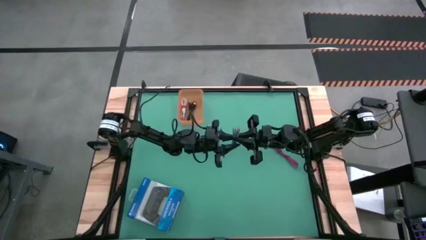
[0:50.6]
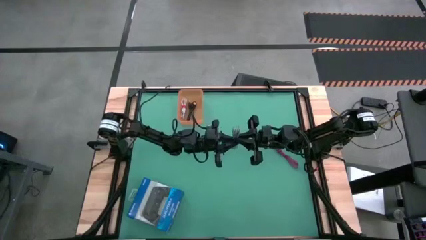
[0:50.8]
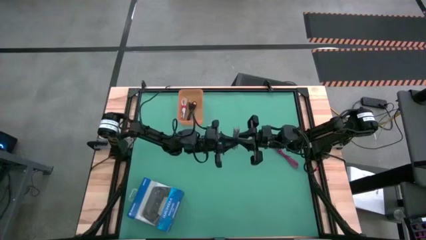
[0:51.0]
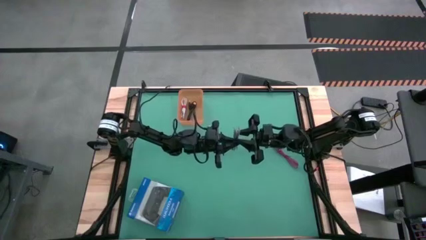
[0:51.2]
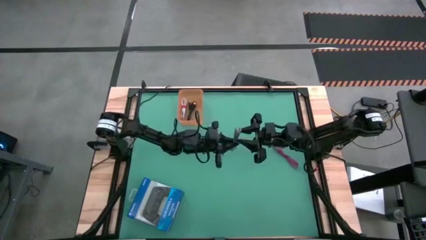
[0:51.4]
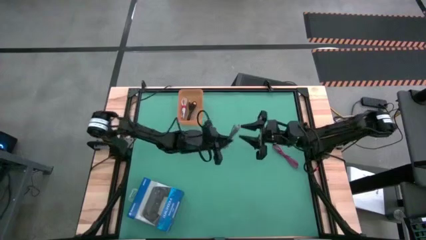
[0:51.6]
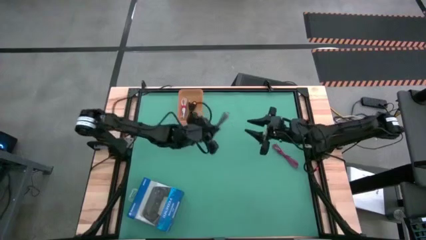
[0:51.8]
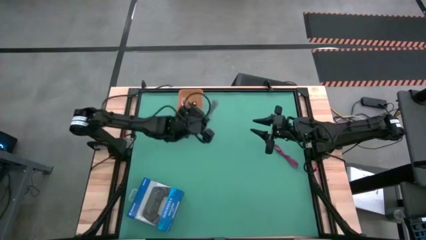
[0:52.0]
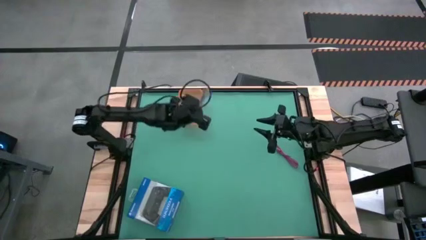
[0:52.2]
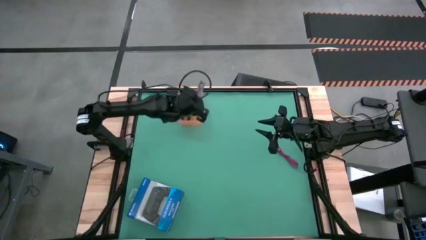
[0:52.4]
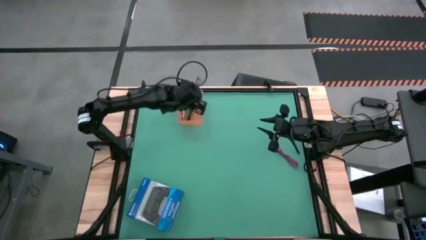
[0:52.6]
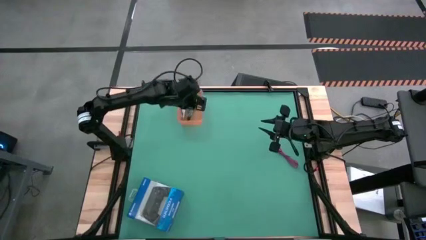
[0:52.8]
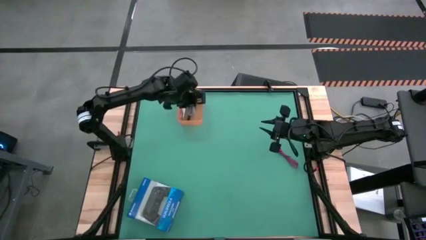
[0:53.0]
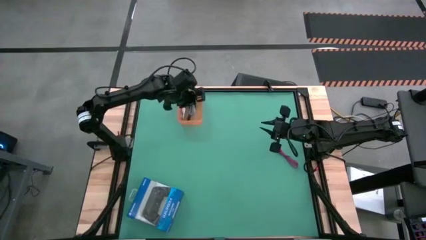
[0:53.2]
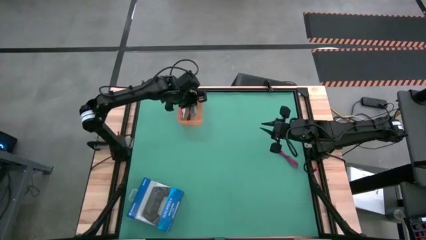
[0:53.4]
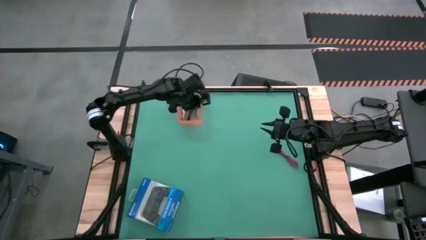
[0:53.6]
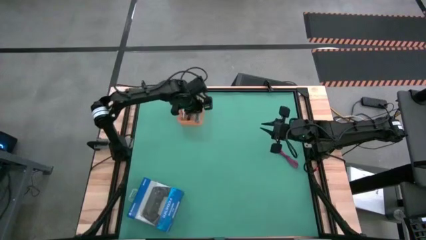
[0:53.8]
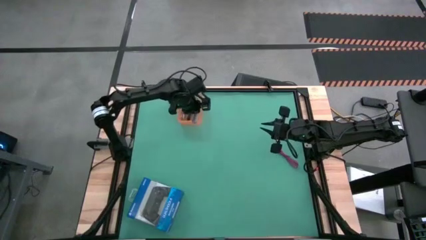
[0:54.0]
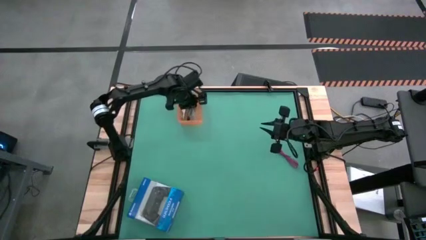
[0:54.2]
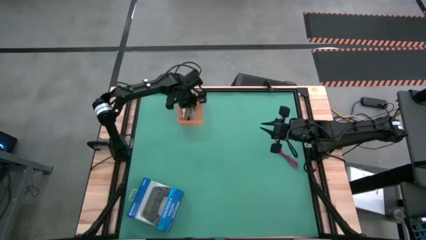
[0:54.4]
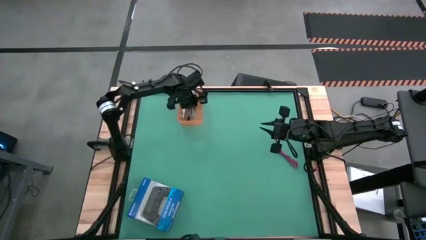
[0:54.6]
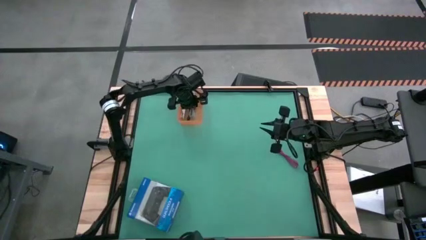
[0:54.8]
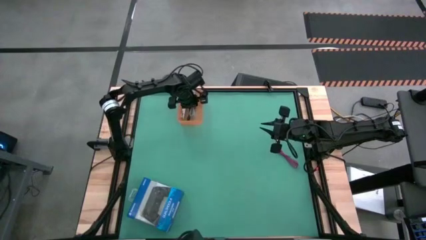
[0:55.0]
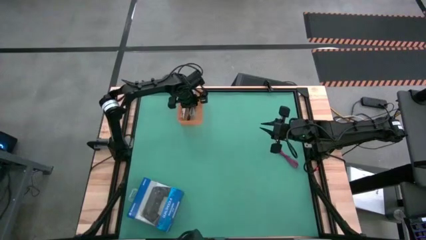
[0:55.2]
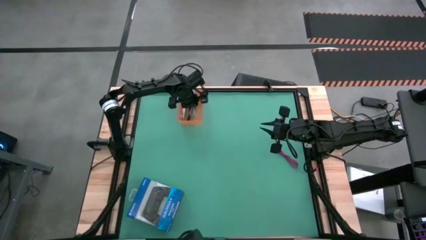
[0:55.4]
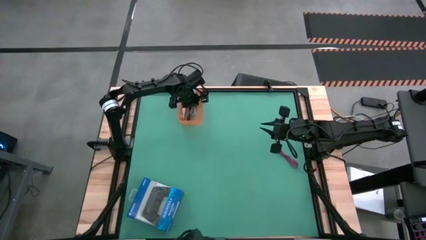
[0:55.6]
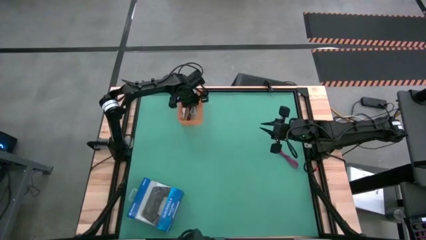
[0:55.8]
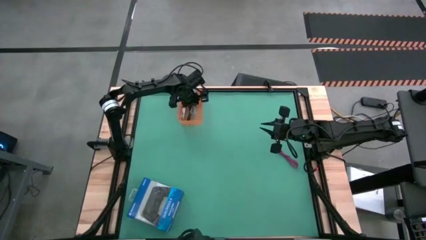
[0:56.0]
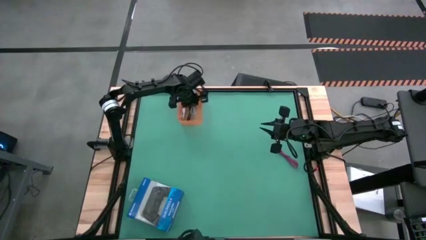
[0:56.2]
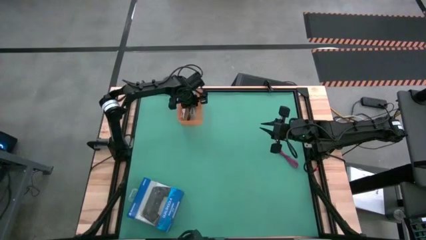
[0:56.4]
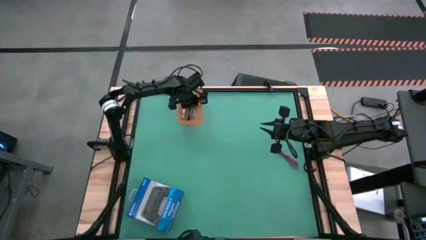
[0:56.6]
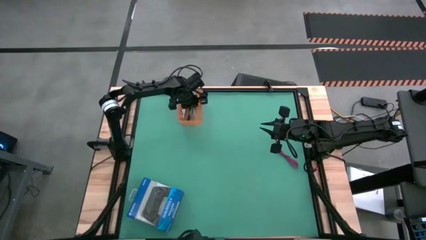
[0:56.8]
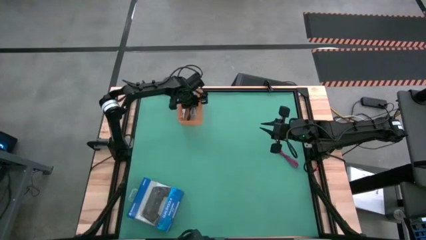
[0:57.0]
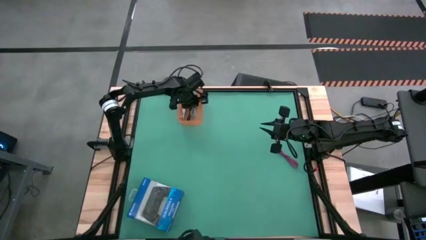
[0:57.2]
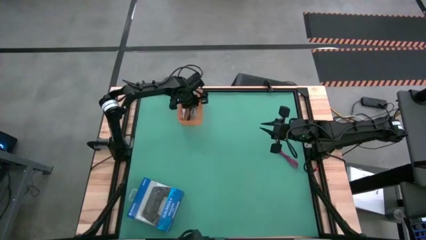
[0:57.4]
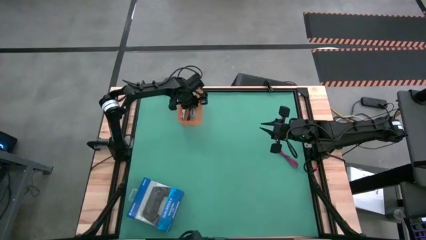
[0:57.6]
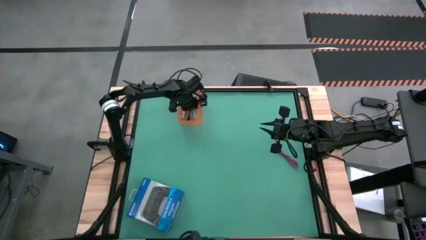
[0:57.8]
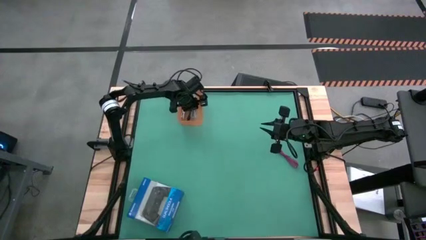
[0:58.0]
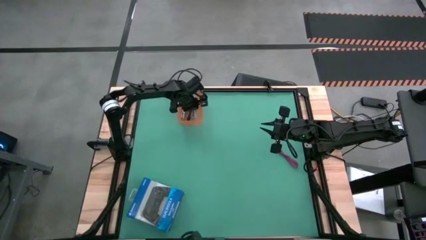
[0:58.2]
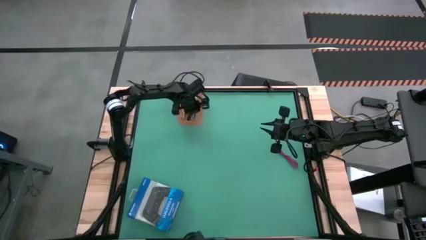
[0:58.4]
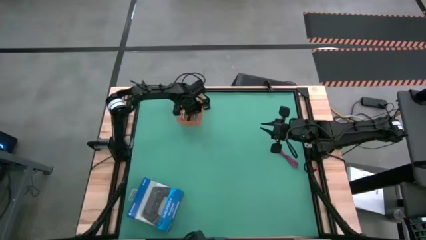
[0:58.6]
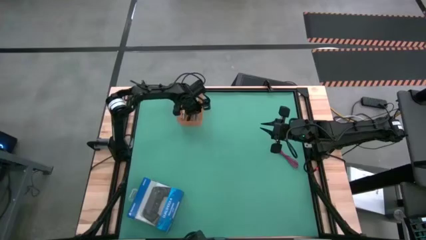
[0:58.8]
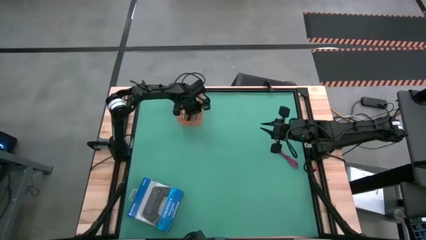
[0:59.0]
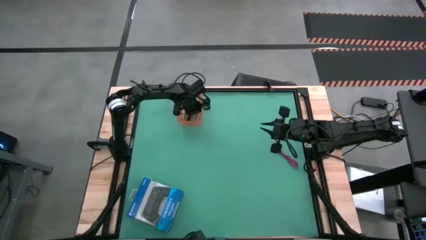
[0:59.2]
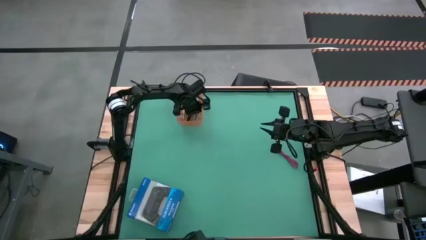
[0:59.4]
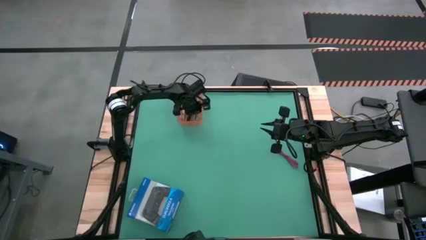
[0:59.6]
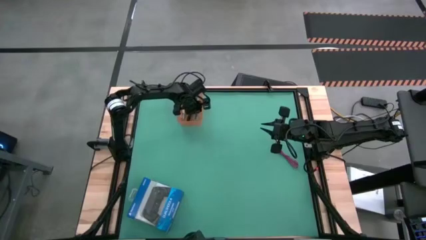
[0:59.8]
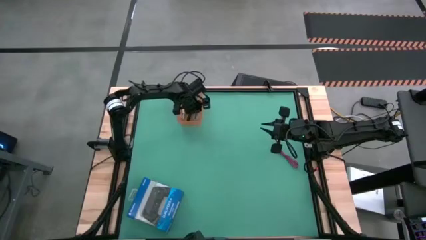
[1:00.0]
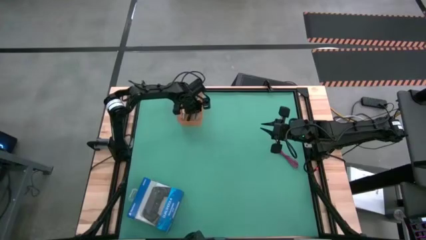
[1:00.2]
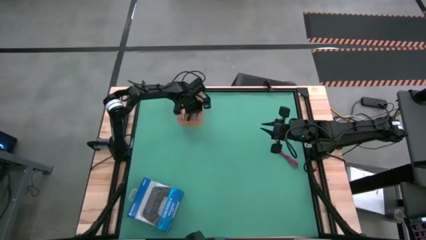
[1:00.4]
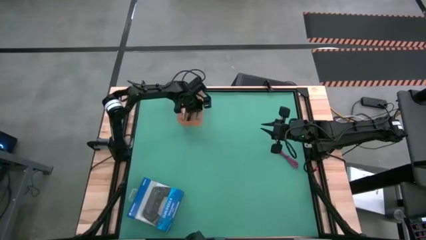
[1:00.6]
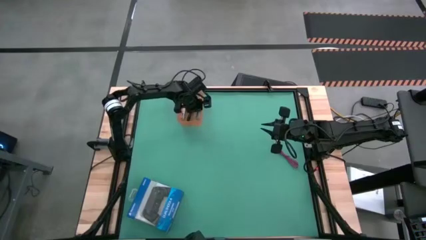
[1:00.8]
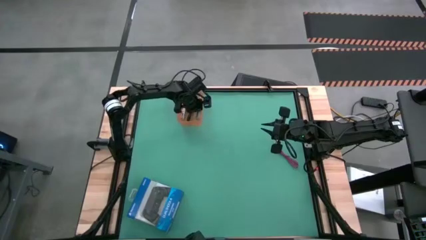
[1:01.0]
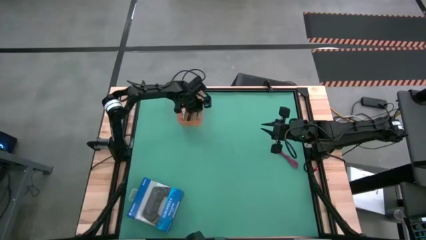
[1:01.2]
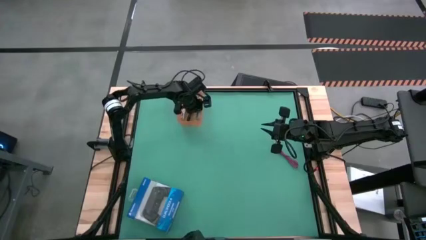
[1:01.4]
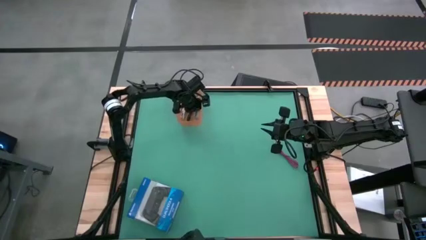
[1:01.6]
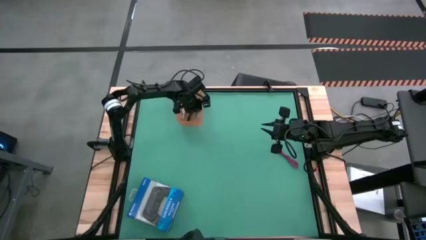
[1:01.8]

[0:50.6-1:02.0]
Task: Pick and place USB-C Cables
Put the black and white charger cable into the orange bin

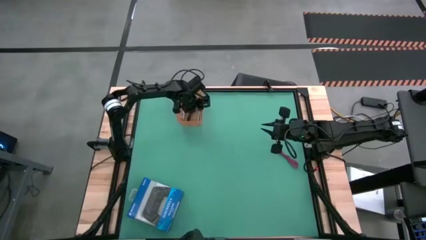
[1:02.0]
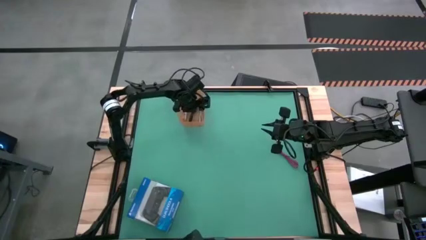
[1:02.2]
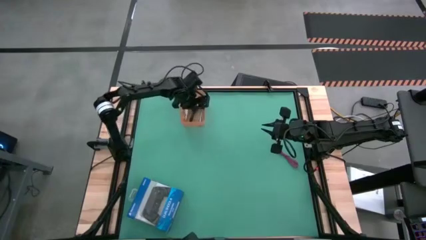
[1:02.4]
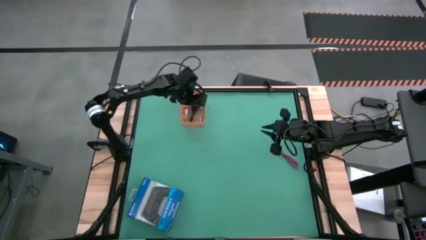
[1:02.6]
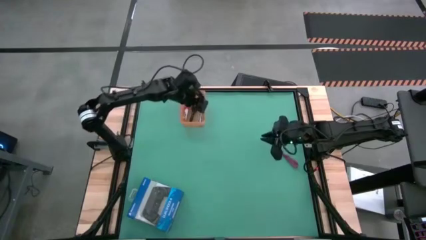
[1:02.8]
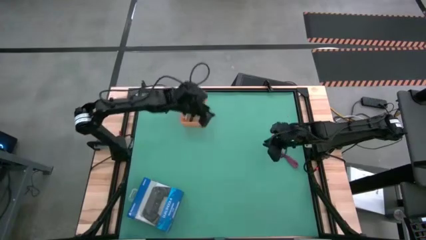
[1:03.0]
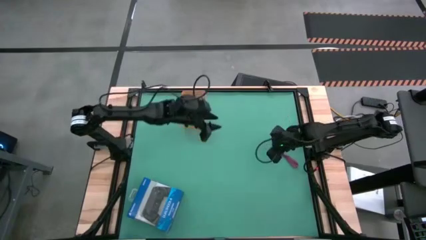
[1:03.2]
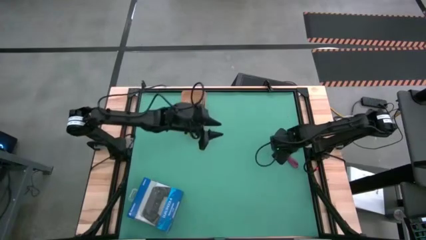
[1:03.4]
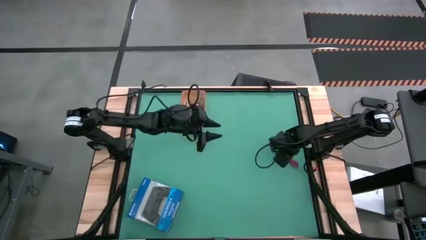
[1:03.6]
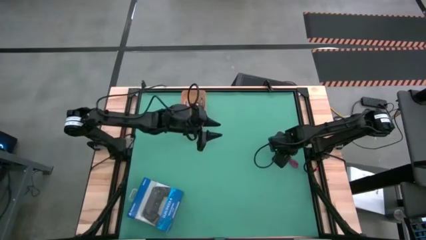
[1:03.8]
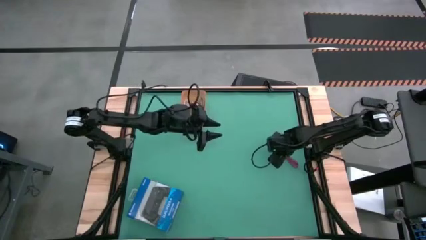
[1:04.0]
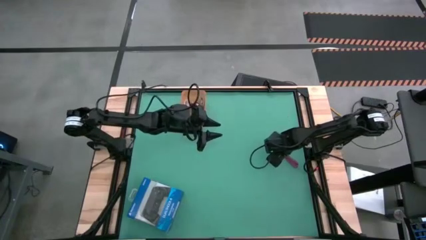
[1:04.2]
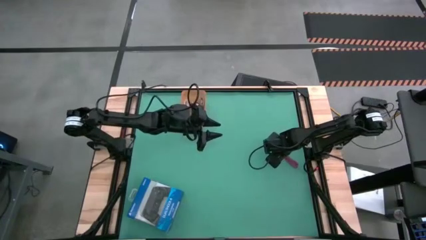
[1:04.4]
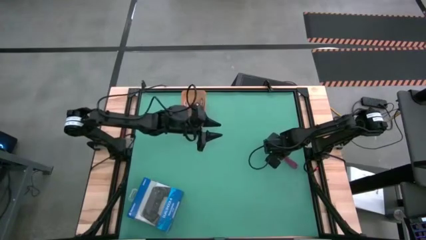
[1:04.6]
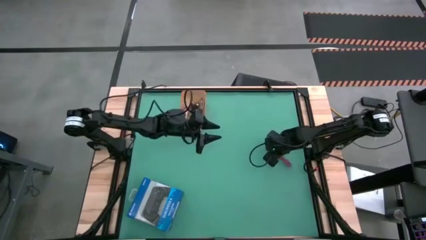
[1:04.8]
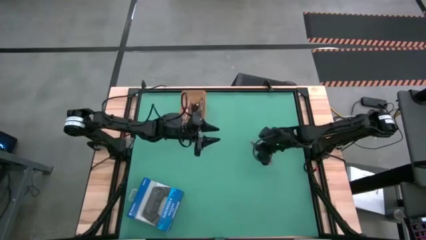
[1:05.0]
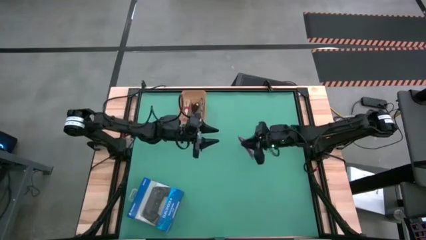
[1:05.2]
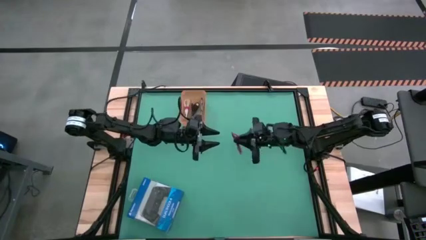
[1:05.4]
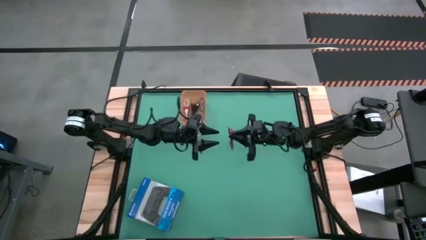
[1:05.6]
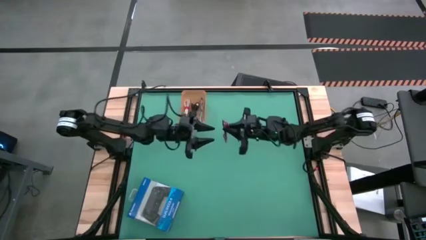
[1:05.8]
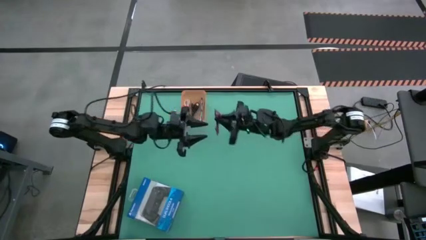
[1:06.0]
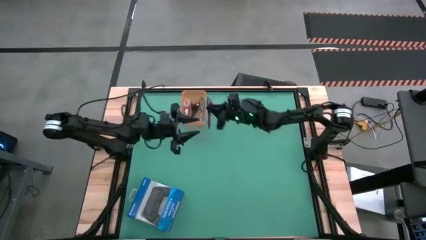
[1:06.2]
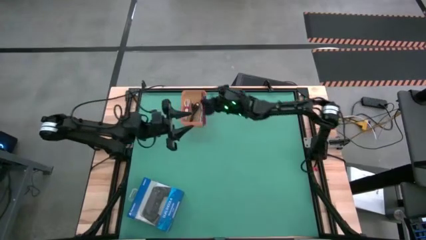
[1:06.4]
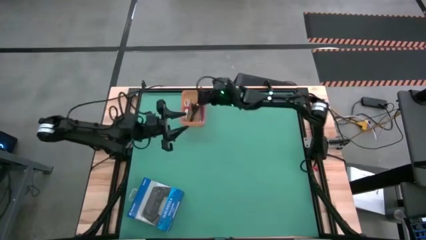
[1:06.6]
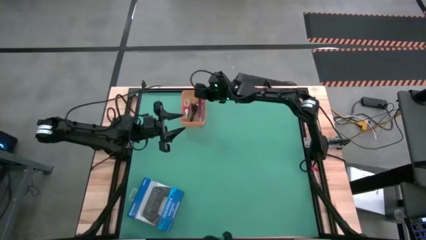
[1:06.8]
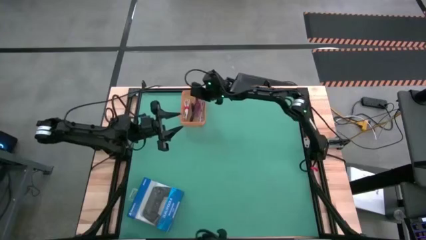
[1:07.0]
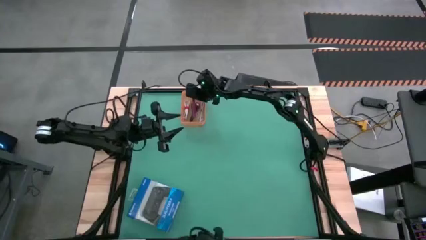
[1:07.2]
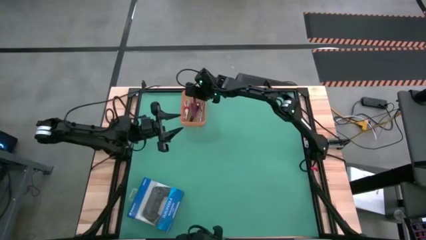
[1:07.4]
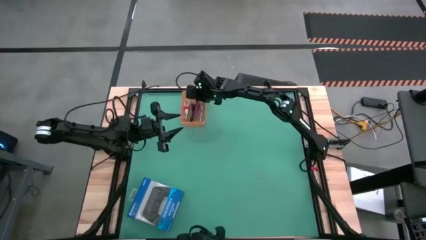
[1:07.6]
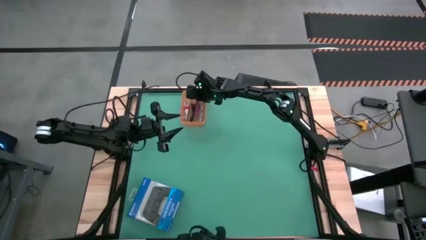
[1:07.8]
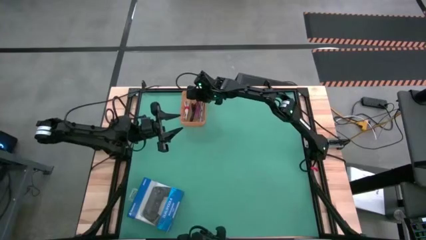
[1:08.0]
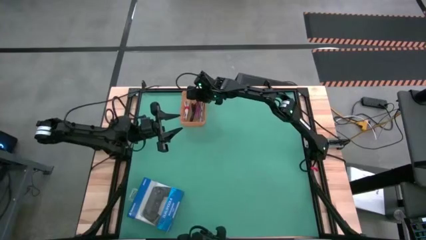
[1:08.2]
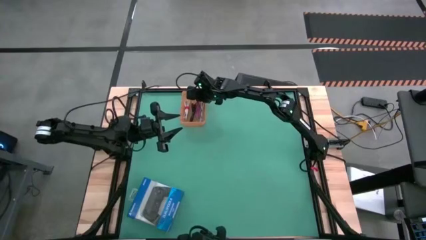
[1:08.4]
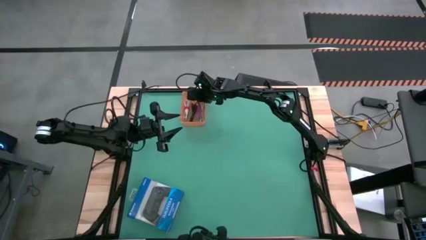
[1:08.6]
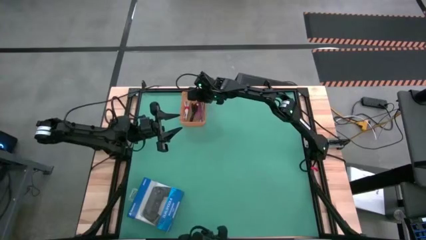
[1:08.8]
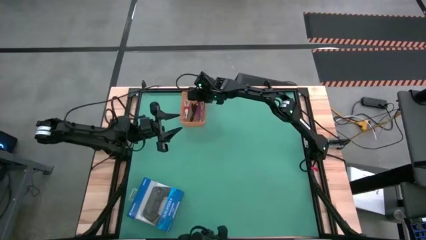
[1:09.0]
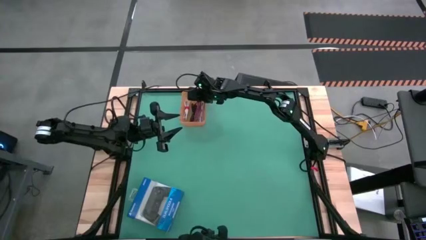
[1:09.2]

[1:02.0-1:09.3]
Put the red charger cable into the orange bin
